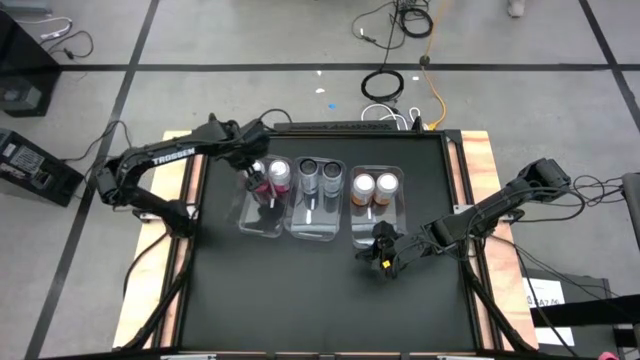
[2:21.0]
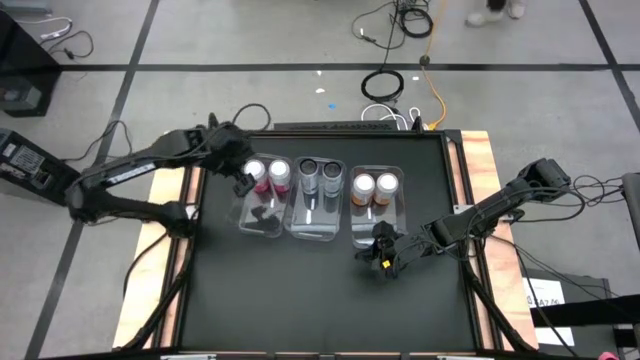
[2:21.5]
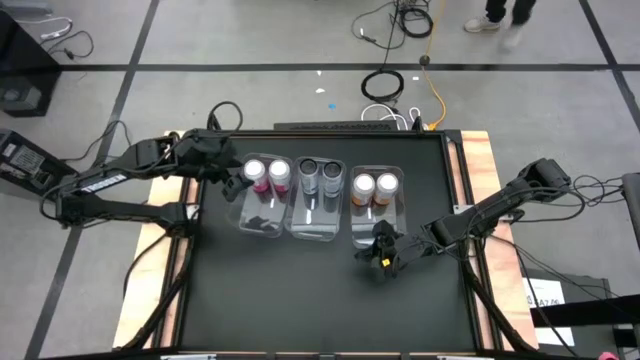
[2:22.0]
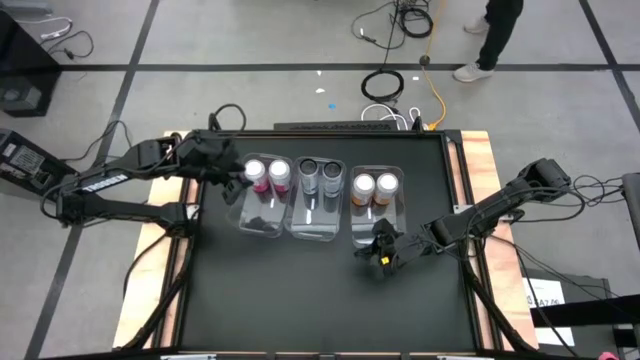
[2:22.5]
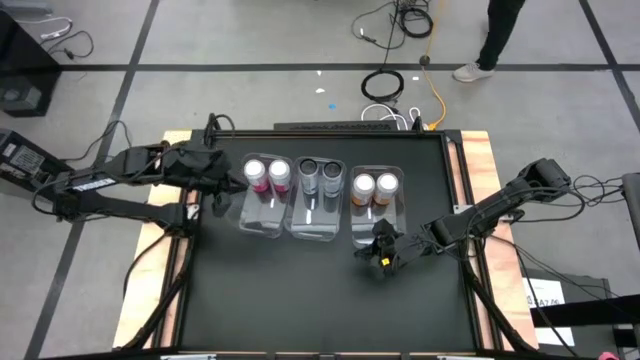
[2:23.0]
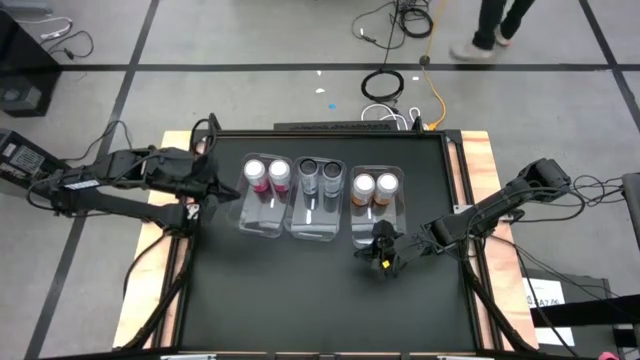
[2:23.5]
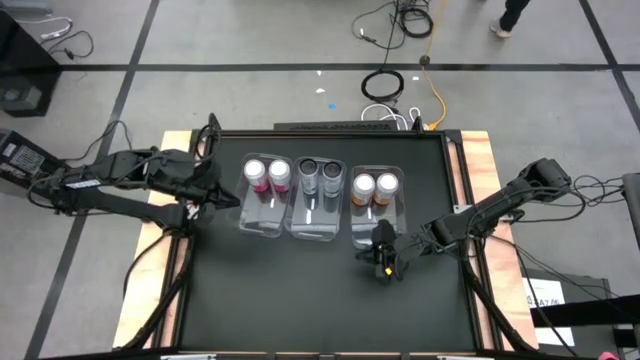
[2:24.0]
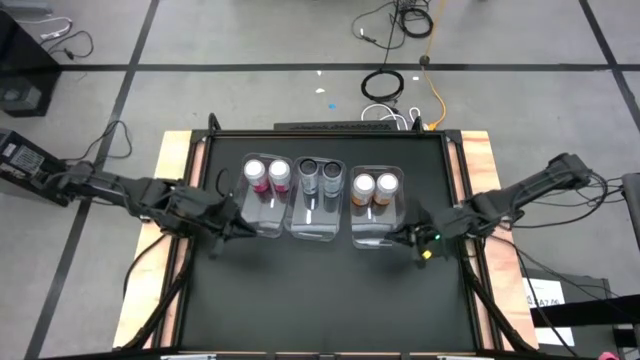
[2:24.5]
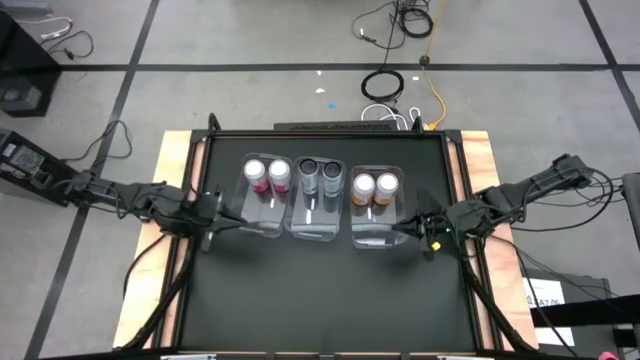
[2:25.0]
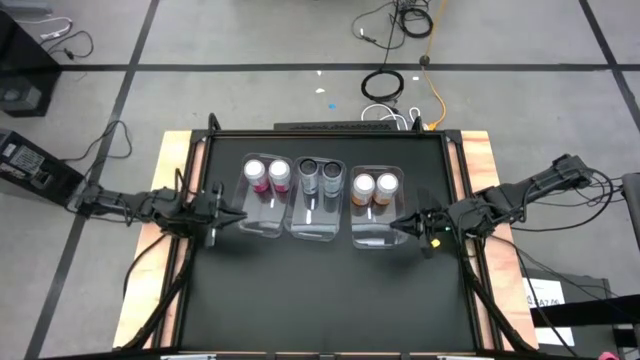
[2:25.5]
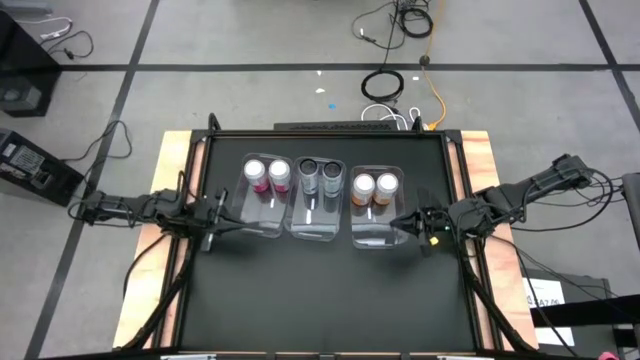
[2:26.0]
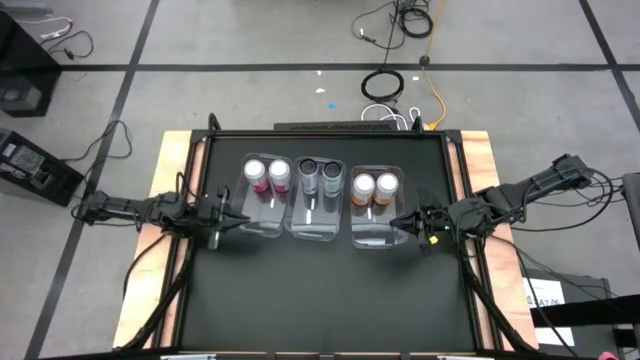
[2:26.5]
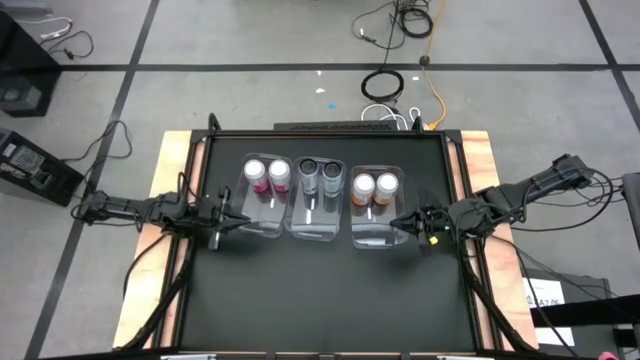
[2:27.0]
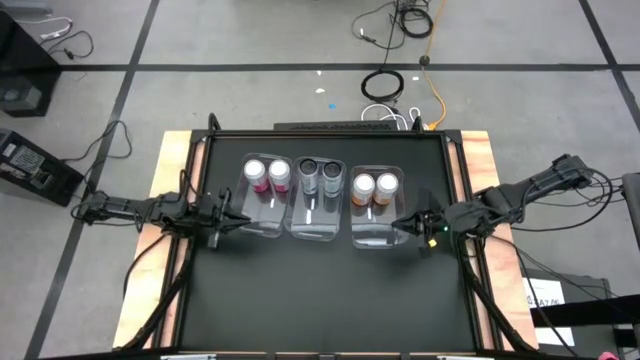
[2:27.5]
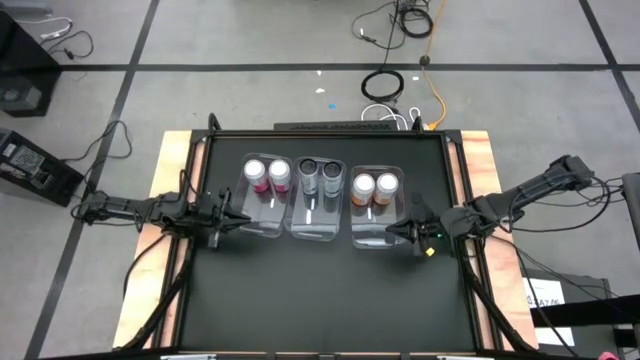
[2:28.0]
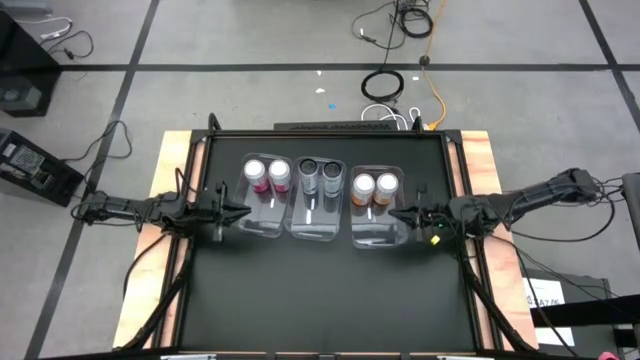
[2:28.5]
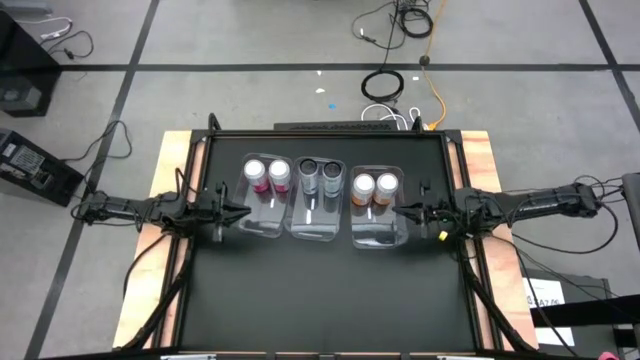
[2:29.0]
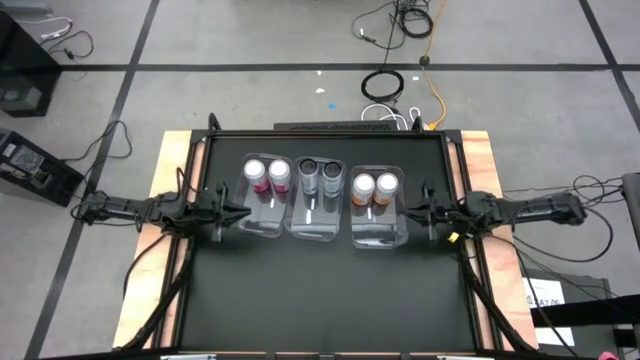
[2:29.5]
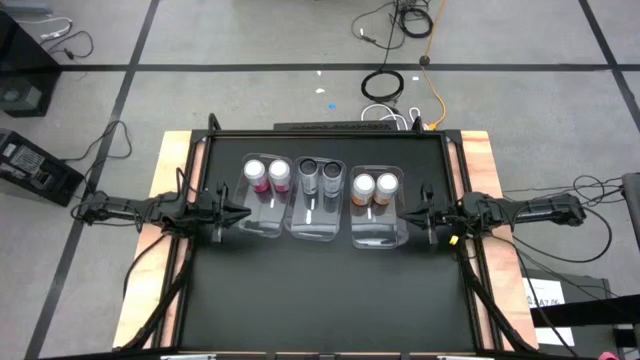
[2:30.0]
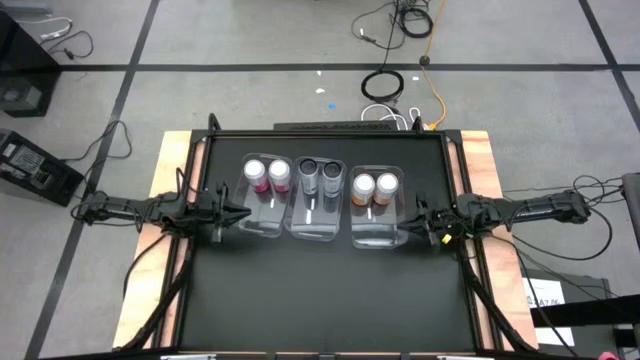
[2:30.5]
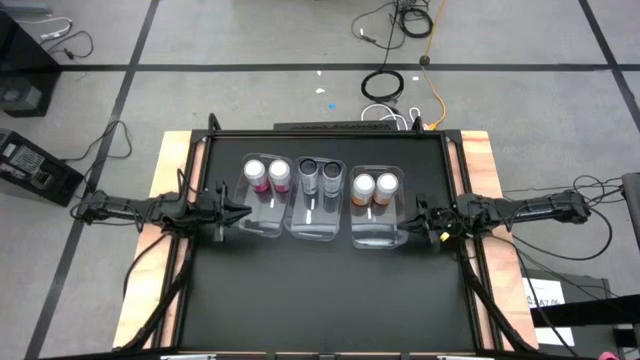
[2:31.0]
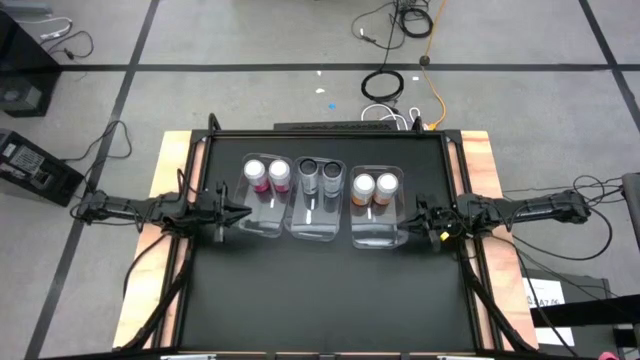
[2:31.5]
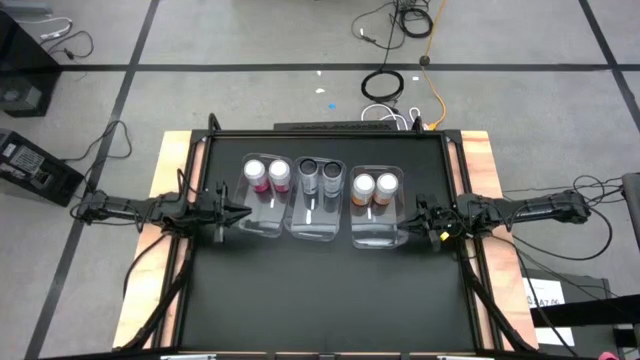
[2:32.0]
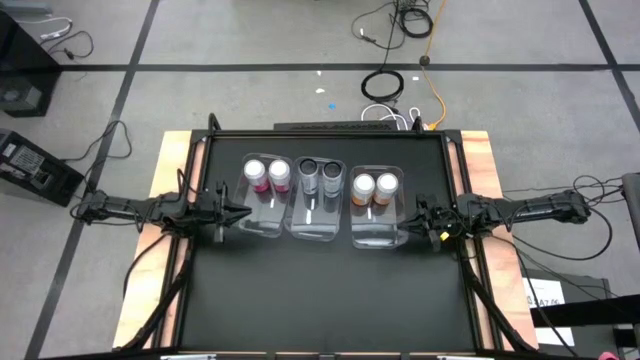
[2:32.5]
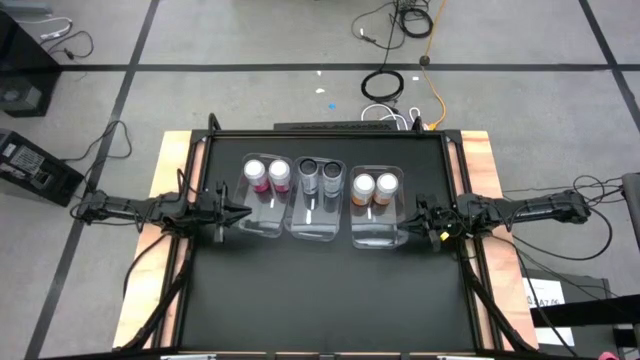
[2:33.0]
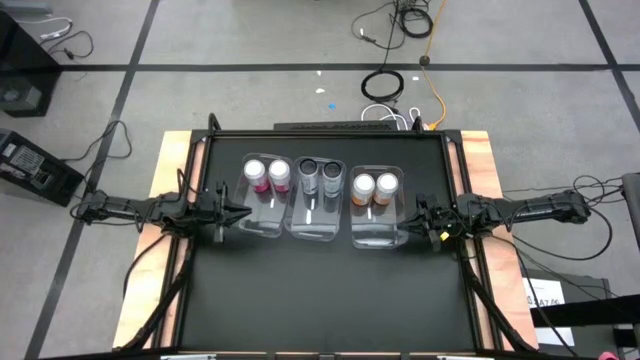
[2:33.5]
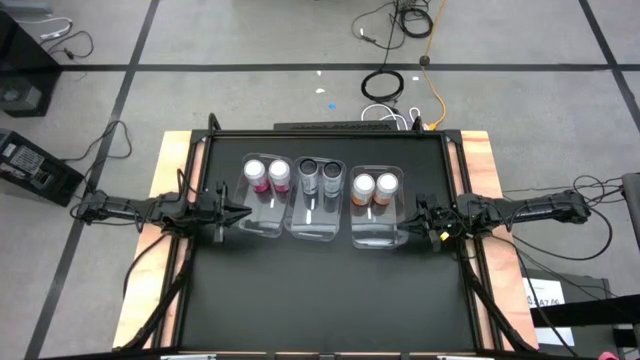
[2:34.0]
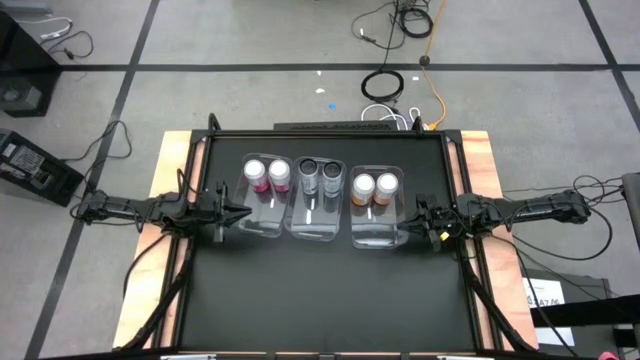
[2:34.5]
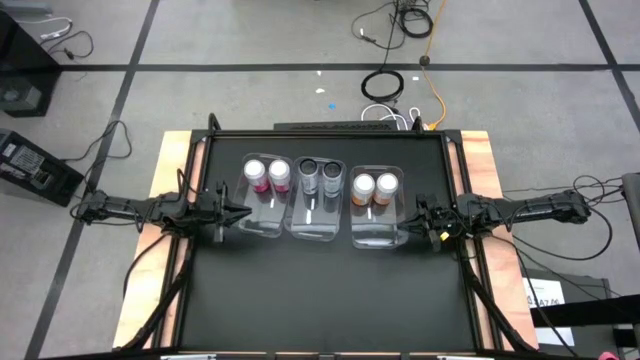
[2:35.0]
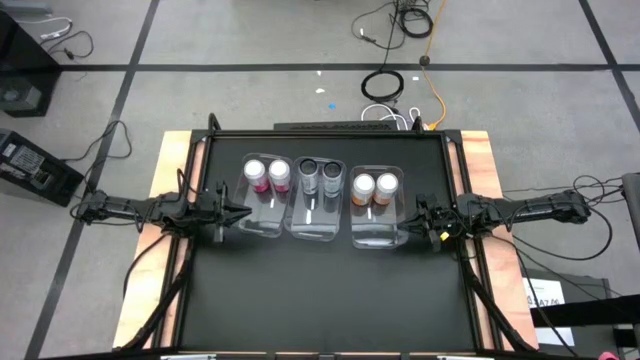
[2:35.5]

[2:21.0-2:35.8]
Task: Sort soda cans
Return to Home Position

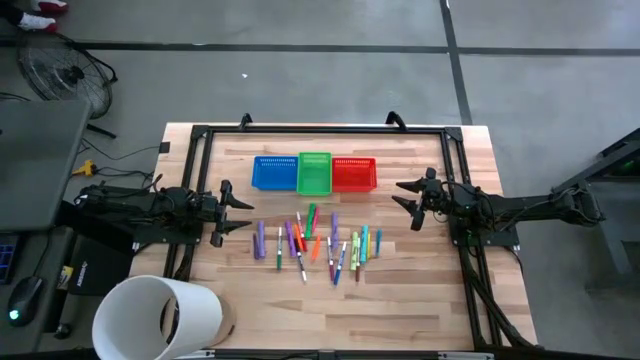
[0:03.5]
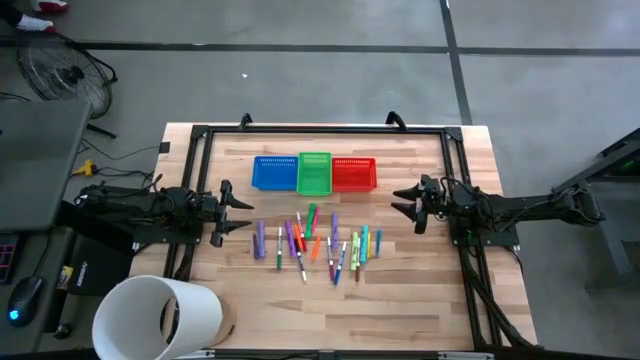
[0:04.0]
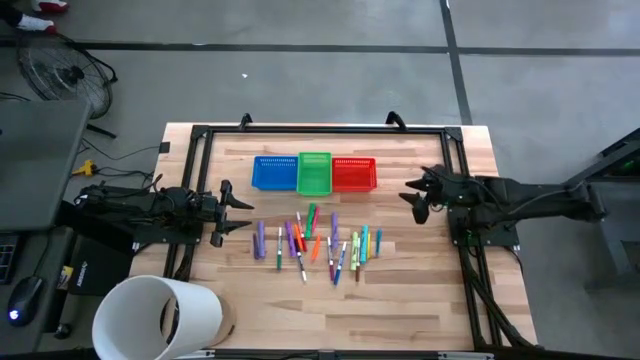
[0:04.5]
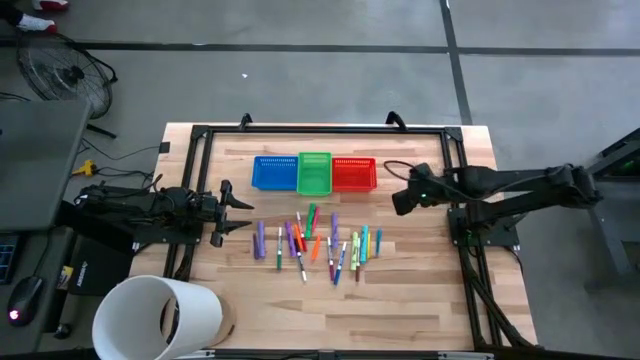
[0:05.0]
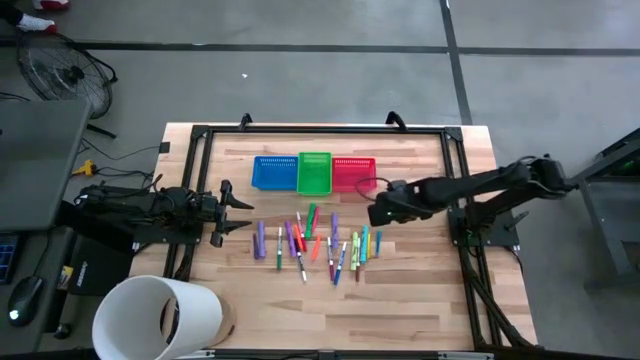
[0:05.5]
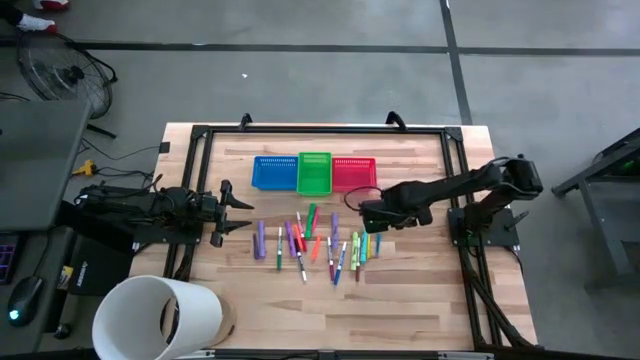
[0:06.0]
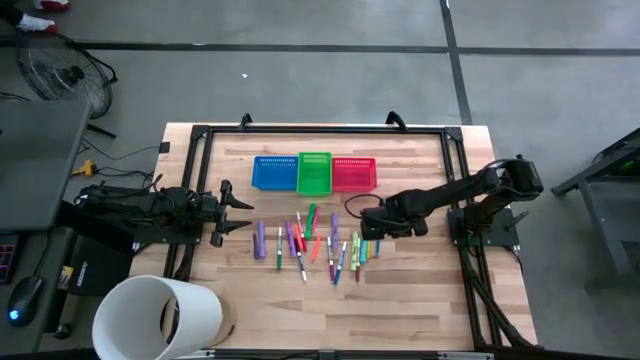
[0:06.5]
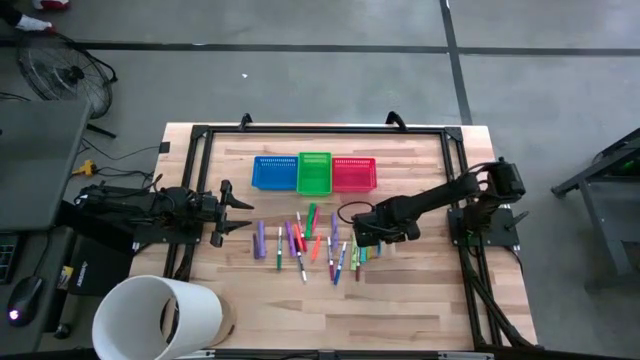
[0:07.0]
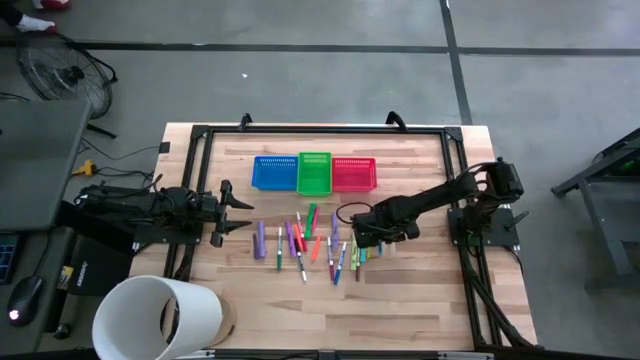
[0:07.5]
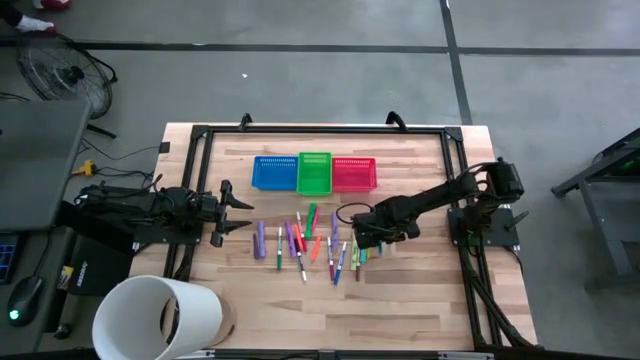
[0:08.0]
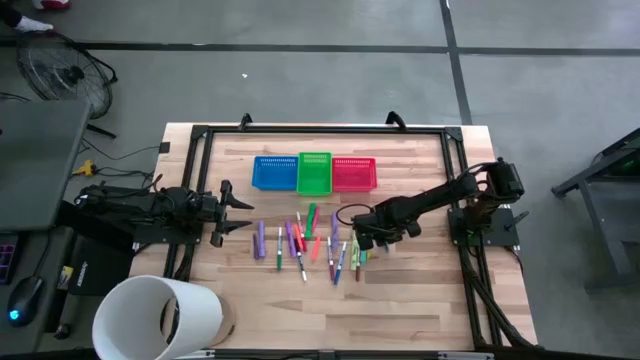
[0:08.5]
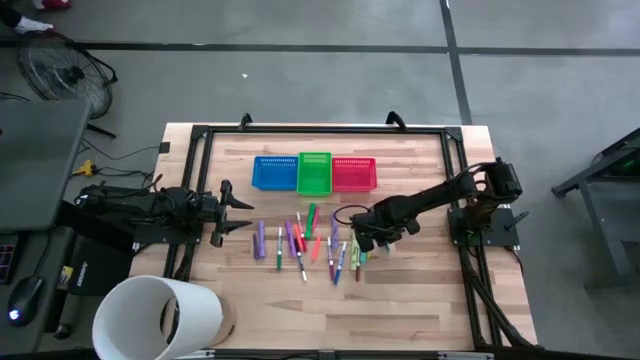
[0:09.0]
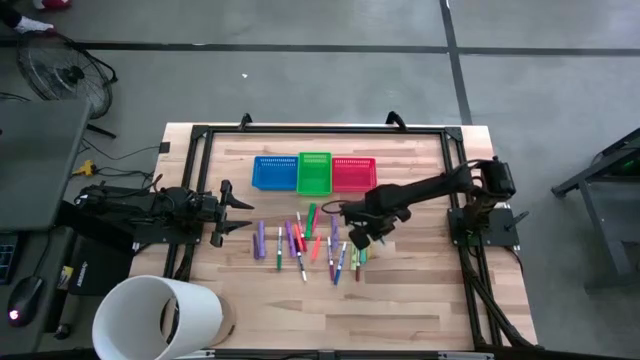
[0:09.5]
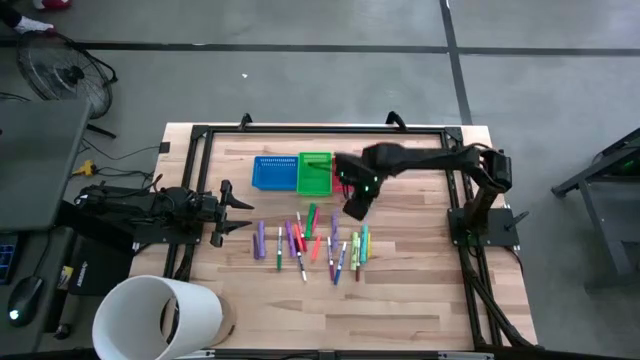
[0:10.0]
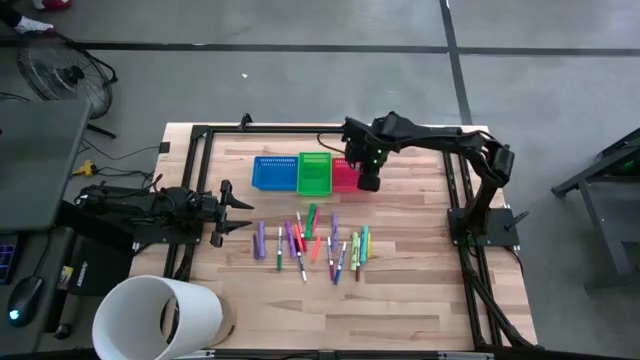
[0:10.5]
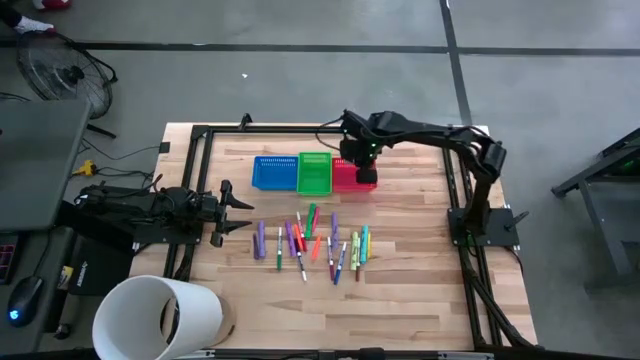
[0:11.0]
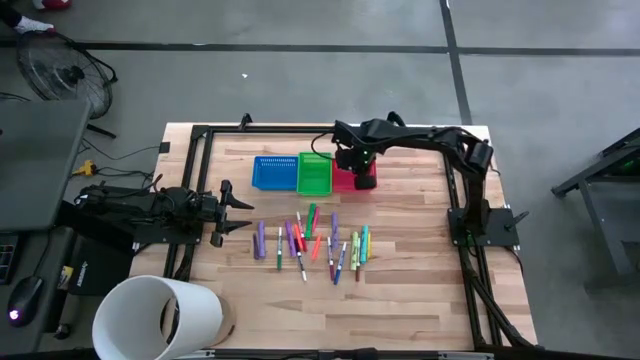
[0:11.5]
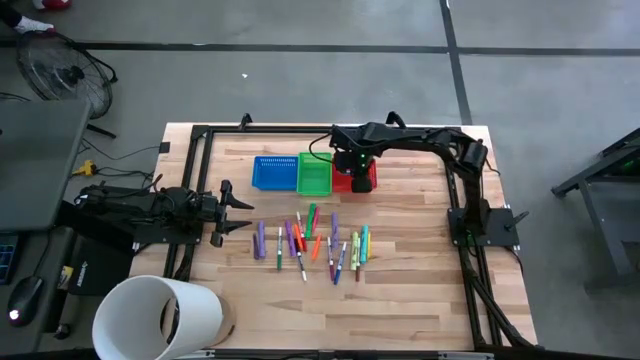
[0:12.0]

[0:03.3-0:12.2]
Task: Pick & Place Markers
Put the blue pen into the red bin
